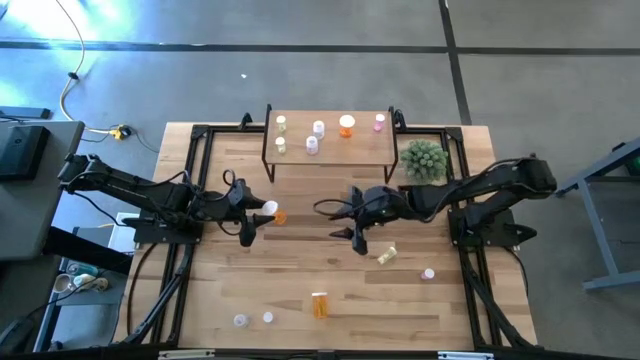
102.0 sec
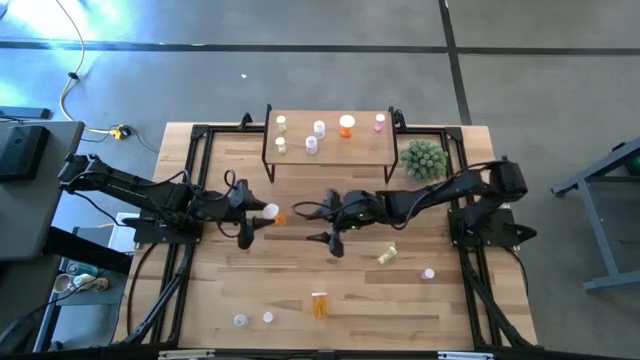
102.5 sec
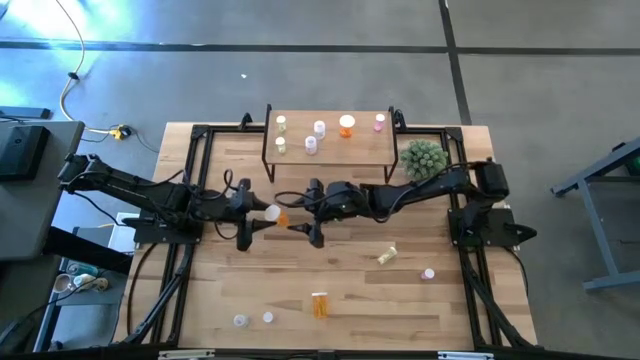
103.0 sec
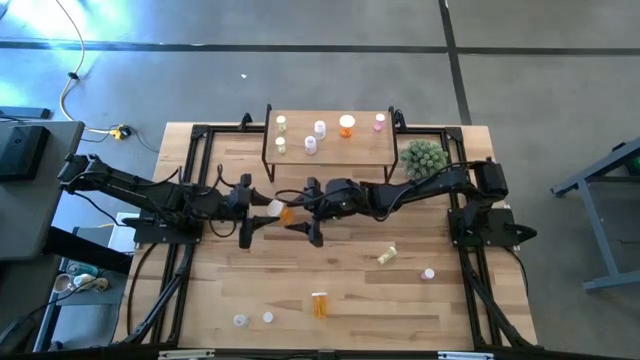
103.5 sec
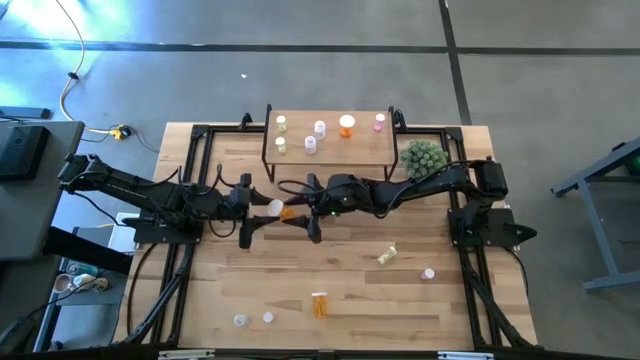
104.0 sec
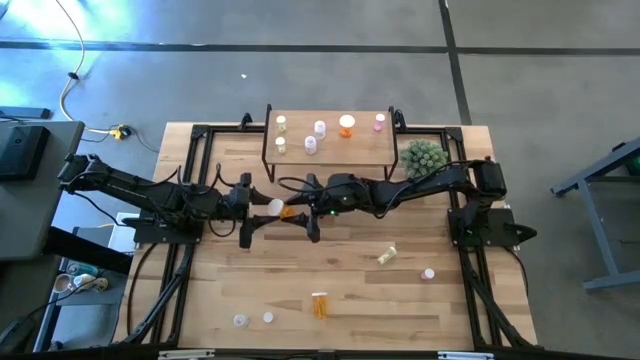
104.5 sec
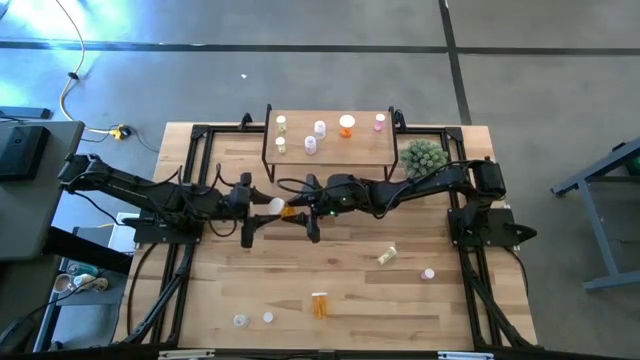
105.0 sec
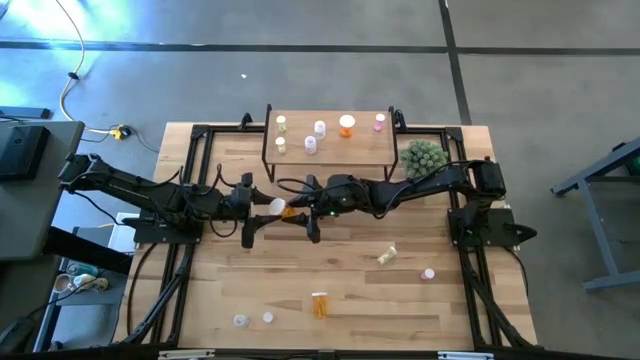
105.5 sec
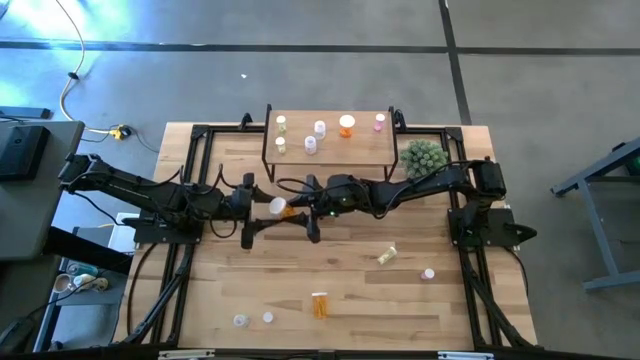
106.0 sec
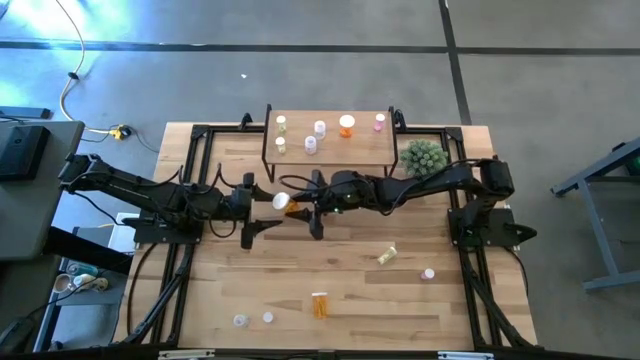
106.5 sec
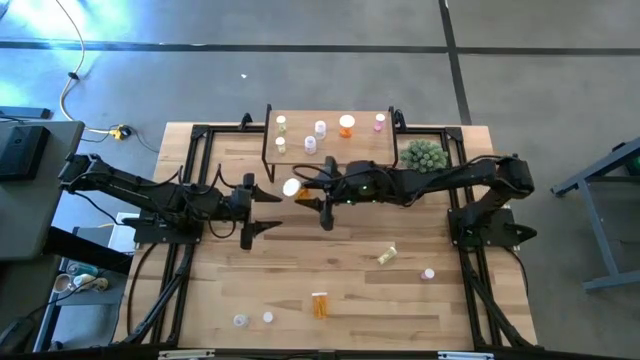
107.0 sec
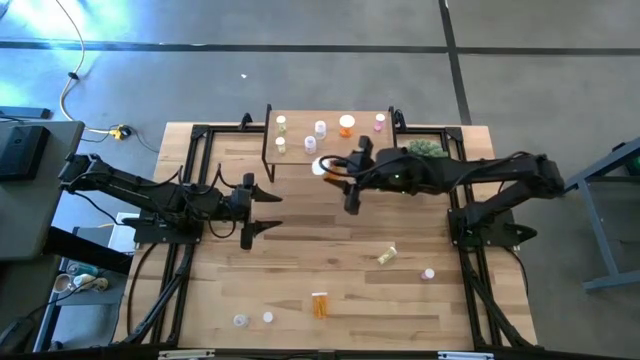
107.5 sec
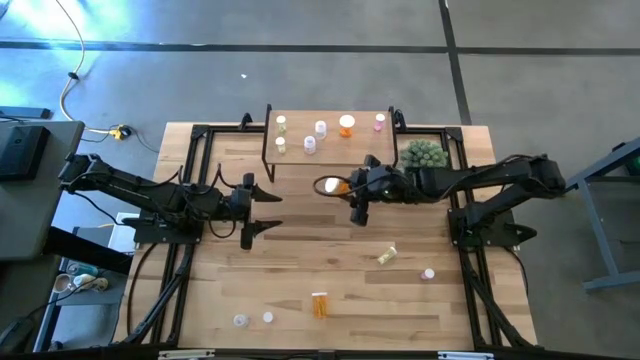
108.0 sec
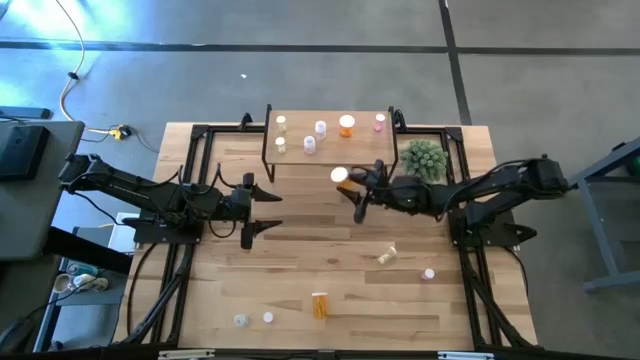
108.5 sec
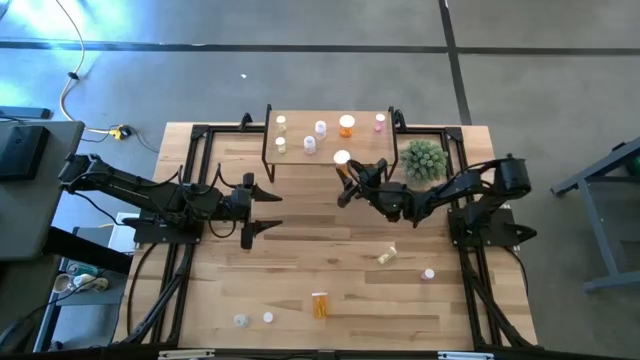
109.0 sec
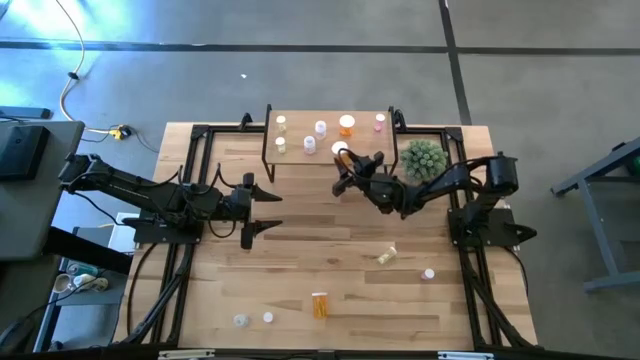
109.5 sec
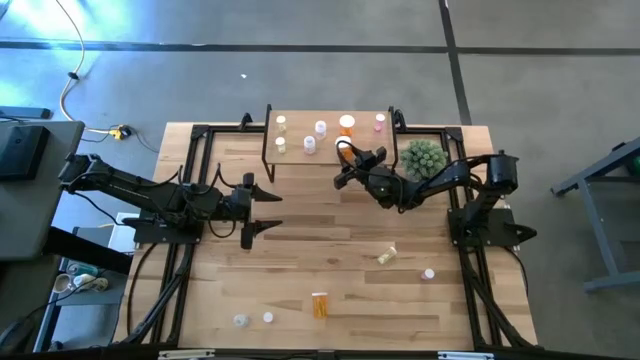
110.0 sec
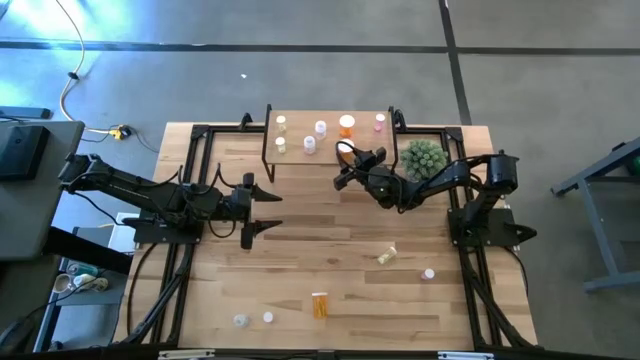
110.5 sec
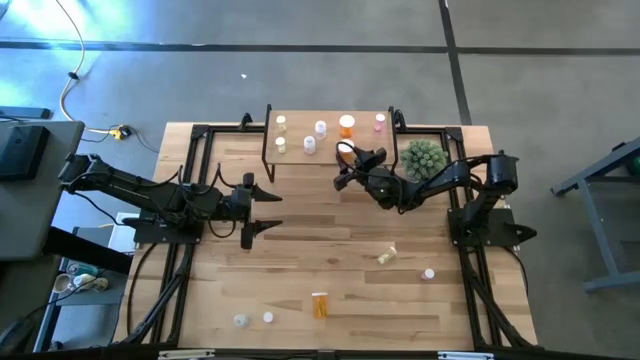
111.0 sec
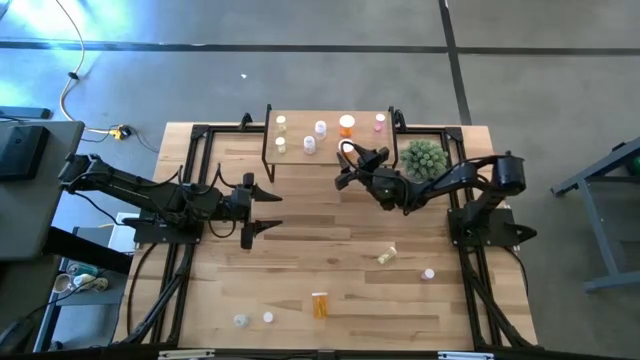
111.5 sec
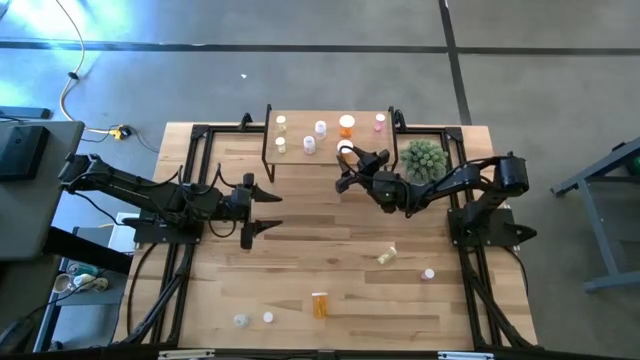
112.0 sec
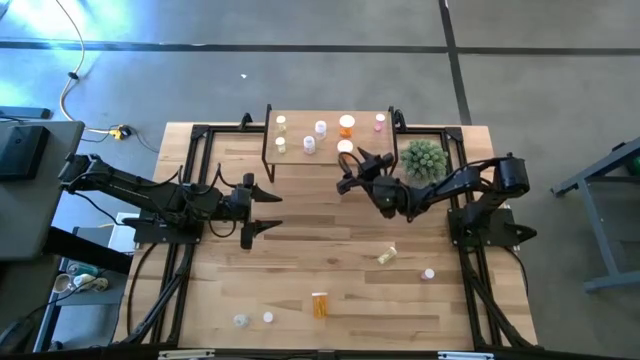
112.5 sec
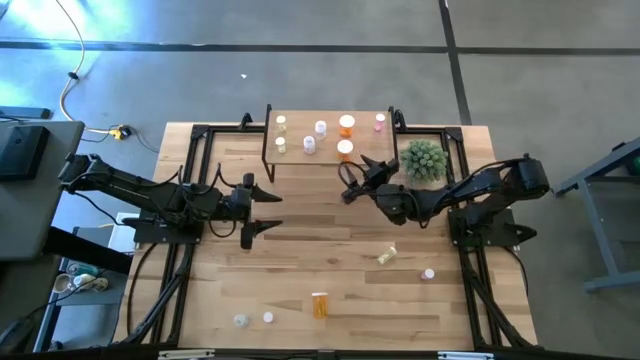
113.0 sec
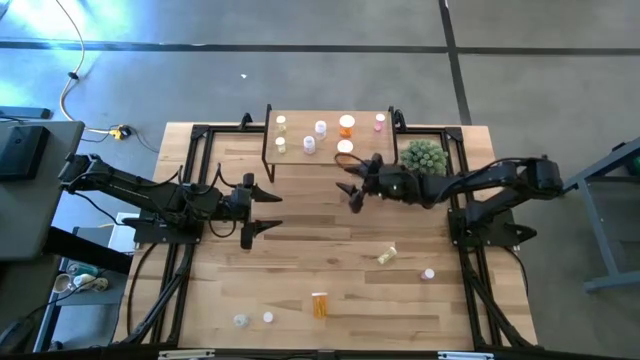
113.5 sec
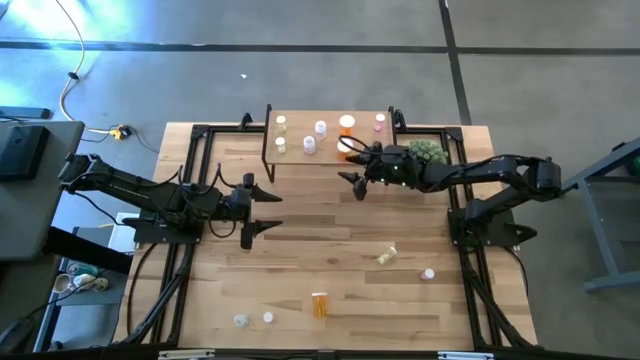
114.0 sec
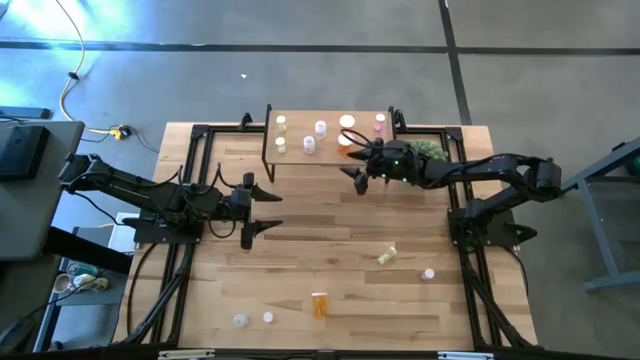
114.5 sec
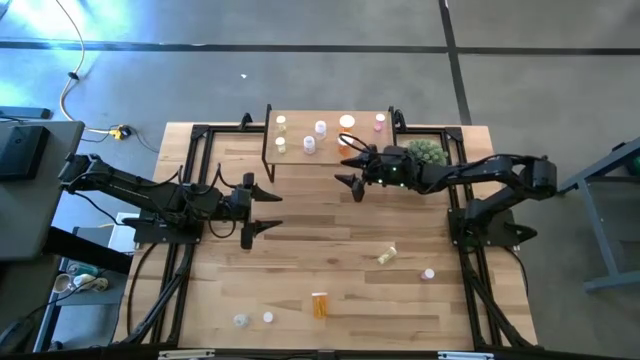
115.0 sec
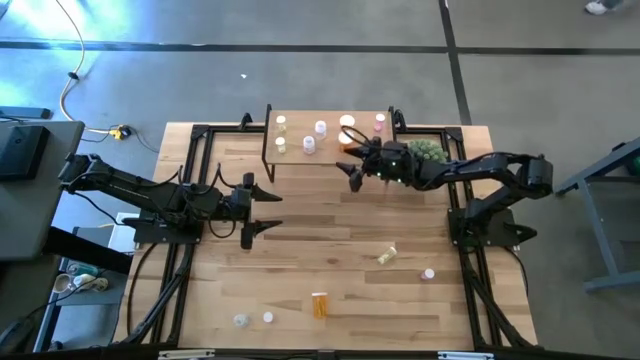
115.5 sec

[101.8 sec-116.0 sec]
Task: Pick and place medicine bottles onto shelf by color
Put the top orange pill bottle aligned with the other orange pill bottle on the shelf

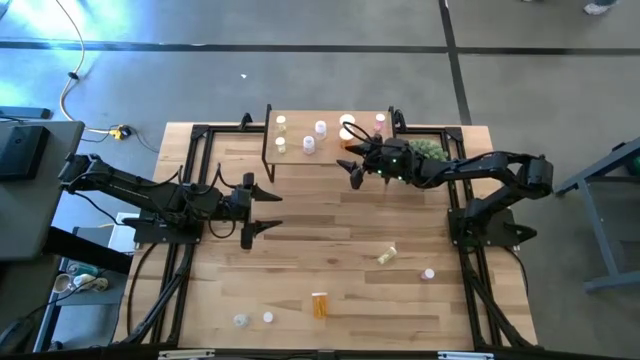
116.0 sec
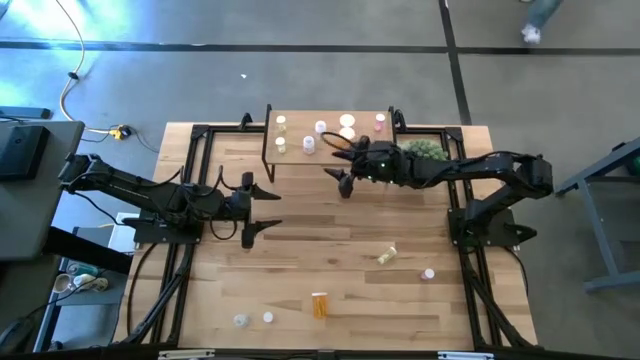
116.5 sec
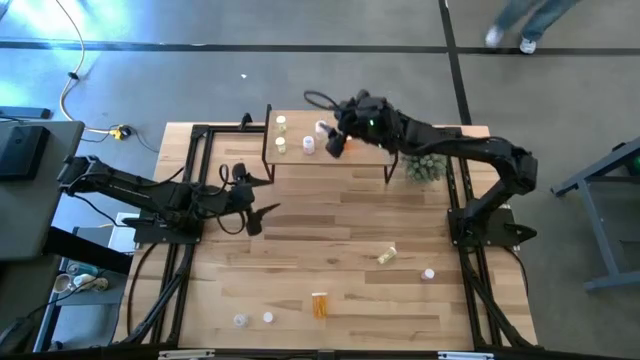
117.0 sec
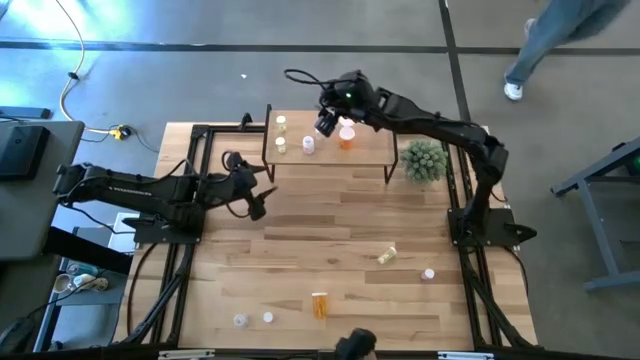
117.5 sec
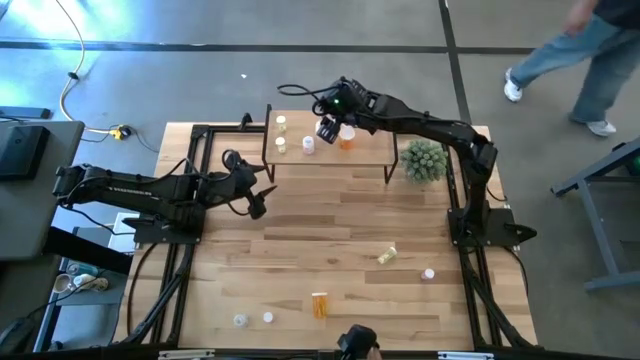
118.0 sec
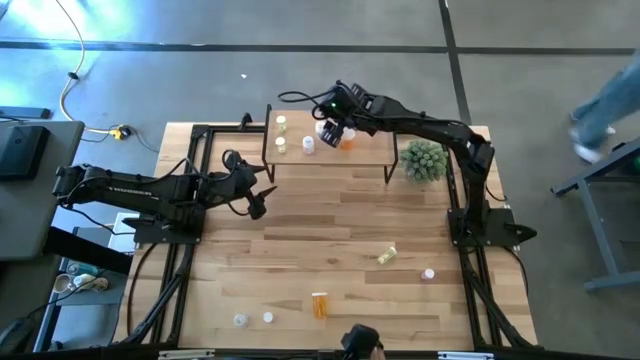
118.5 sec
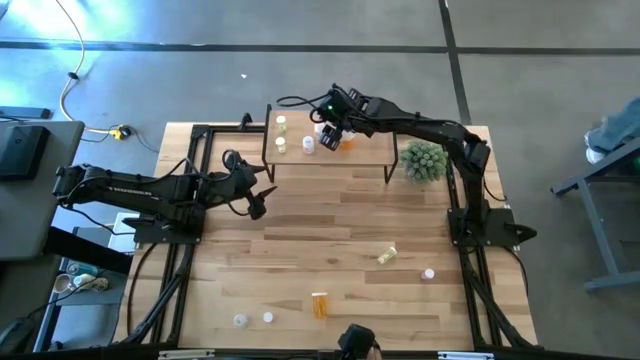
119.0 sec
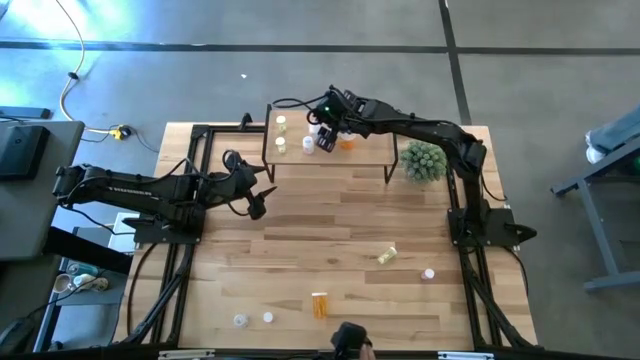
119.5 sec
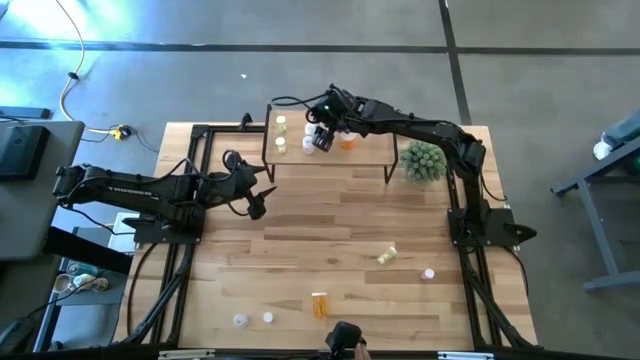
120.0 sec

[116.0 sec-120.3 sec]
Adjust the transparent pill bottle on the shelf

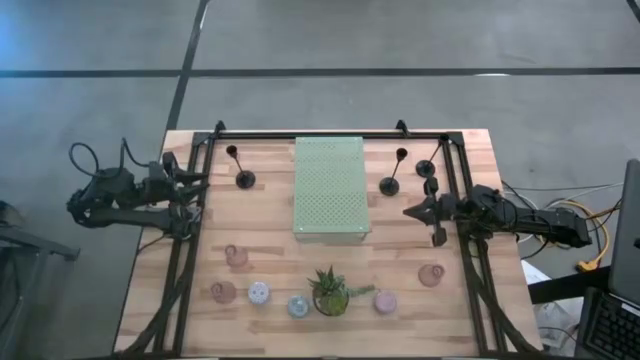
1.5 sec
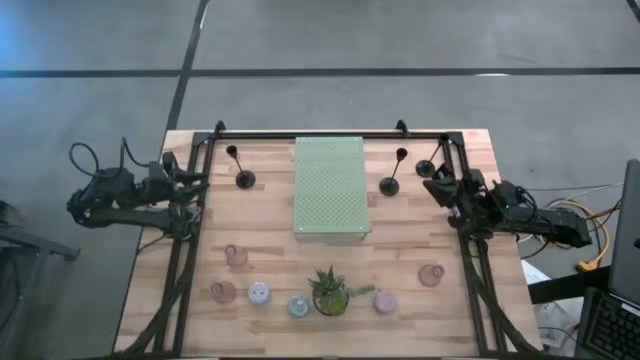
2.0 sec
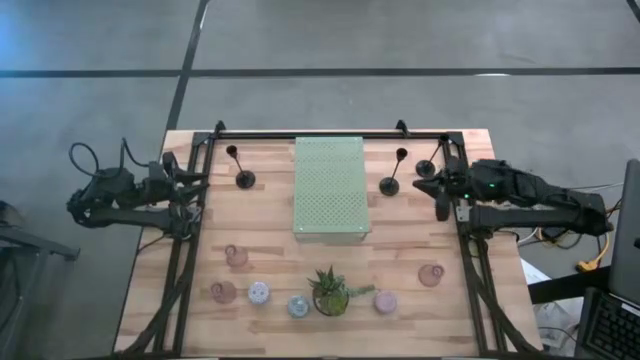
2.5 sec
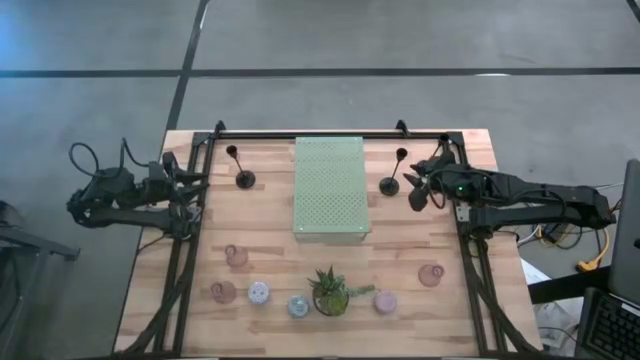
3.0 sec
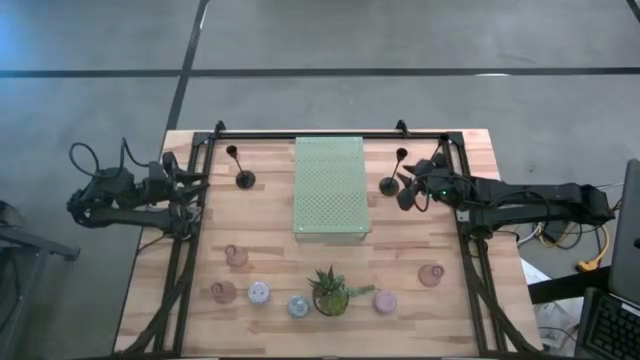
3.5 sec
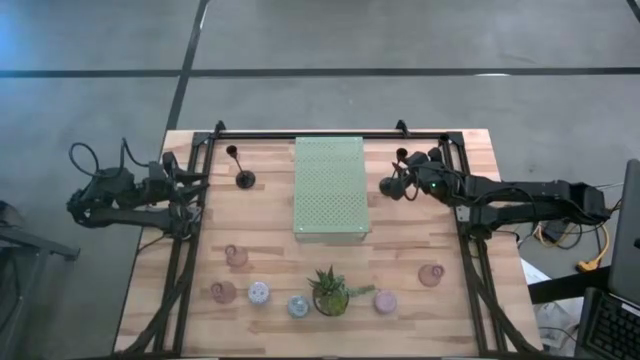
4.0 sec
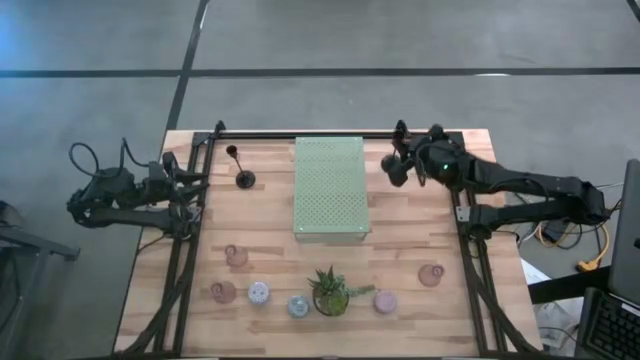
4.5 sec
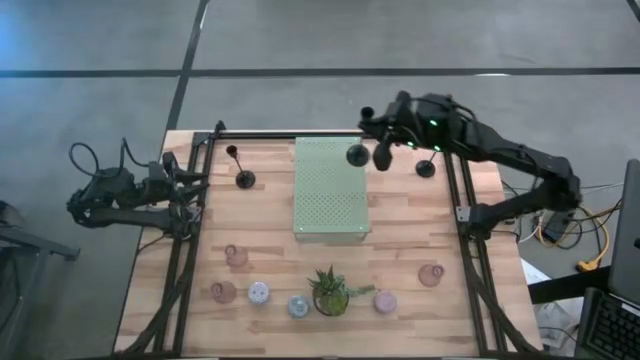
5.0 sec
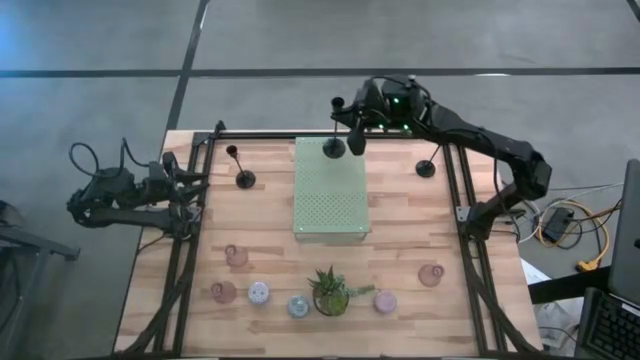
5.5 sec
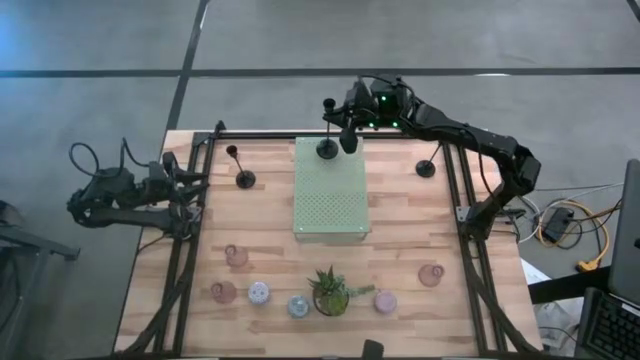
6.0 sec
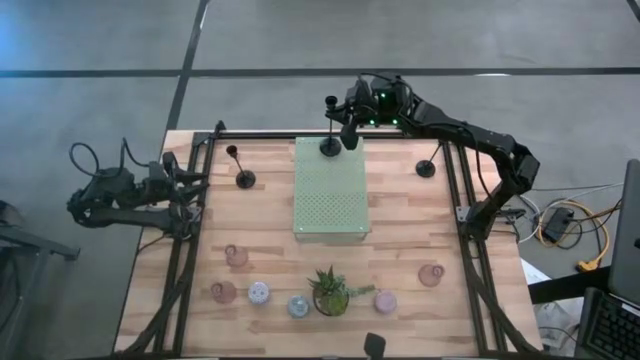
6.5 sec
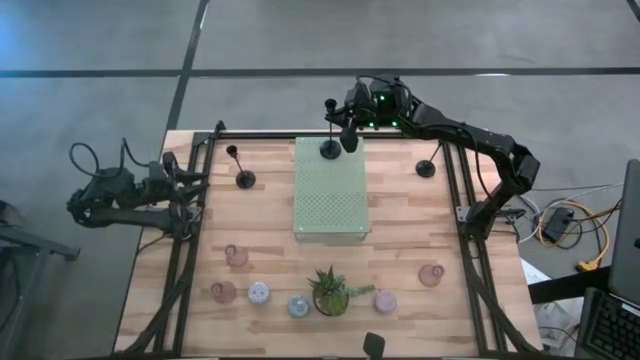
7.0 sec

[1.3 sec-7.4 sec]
Task: Pick & Place candle stick holders
Put the middle black candle holder on the shelf
